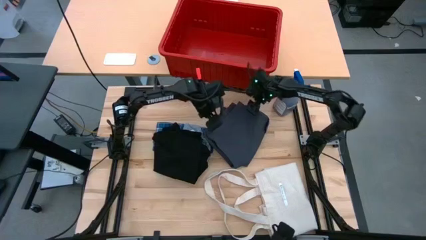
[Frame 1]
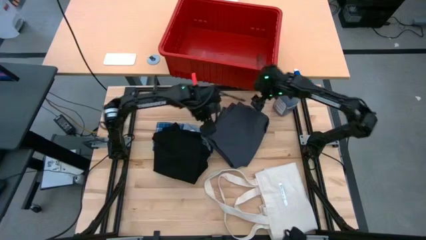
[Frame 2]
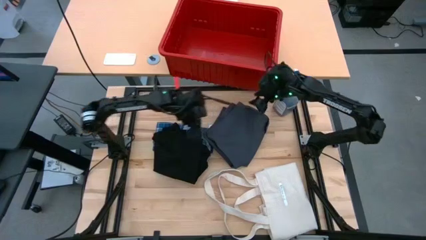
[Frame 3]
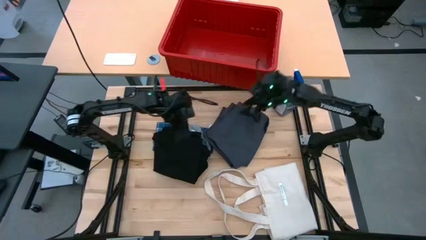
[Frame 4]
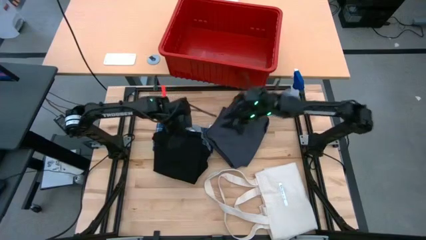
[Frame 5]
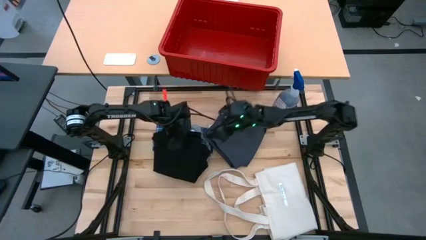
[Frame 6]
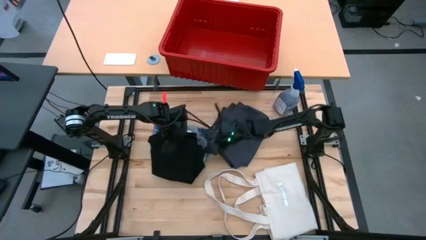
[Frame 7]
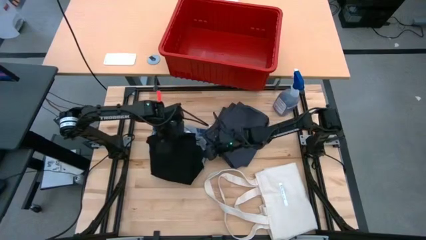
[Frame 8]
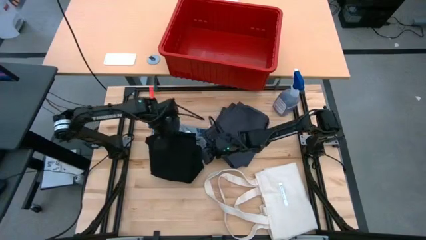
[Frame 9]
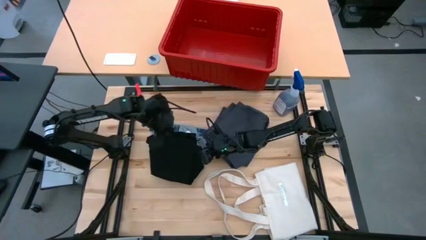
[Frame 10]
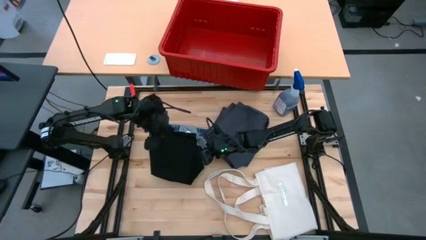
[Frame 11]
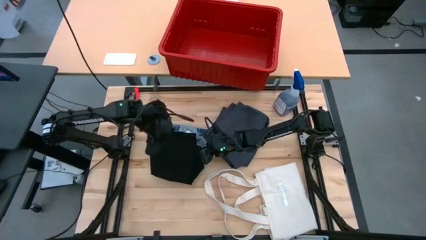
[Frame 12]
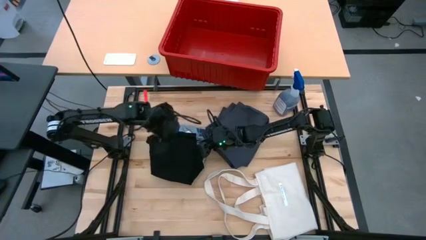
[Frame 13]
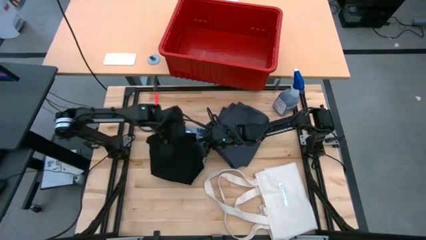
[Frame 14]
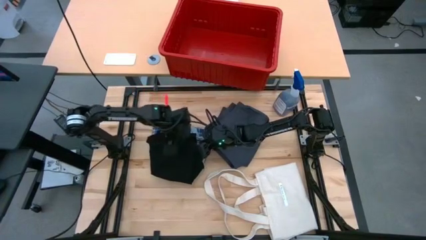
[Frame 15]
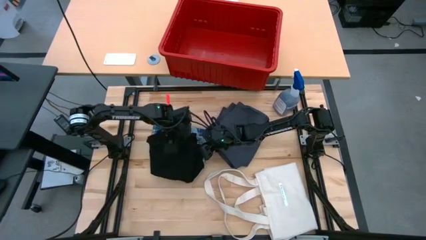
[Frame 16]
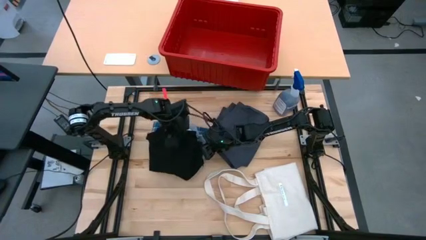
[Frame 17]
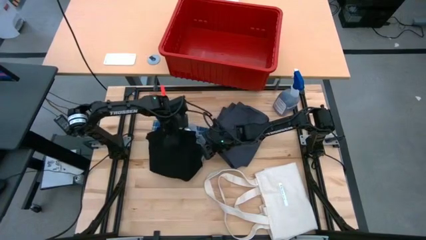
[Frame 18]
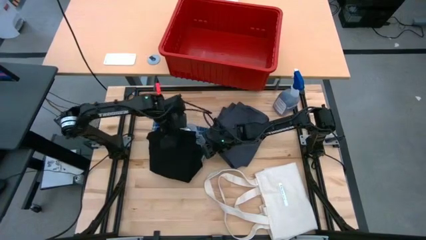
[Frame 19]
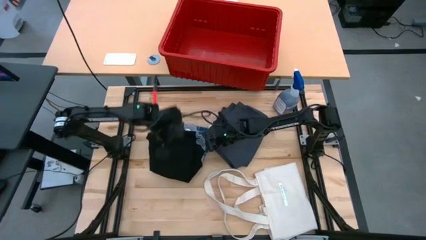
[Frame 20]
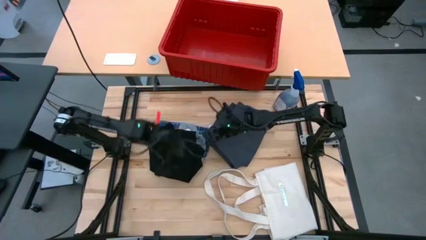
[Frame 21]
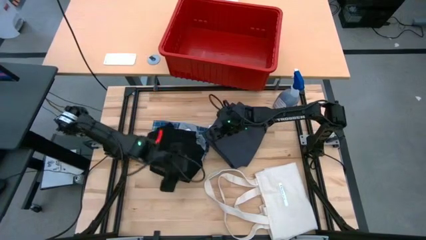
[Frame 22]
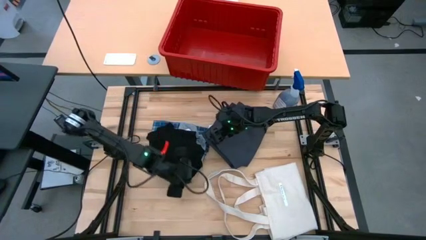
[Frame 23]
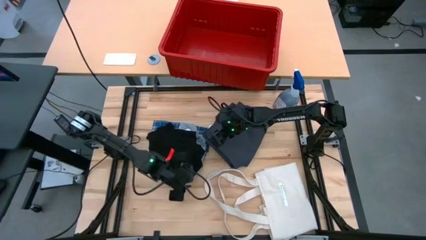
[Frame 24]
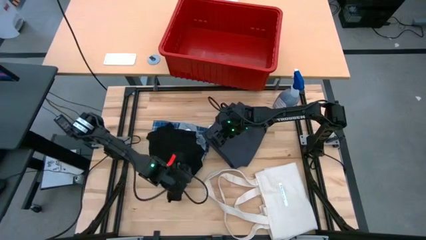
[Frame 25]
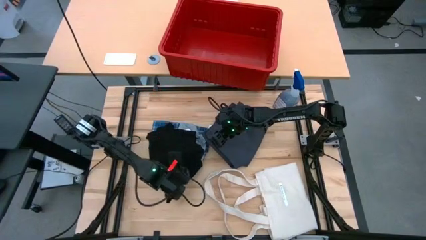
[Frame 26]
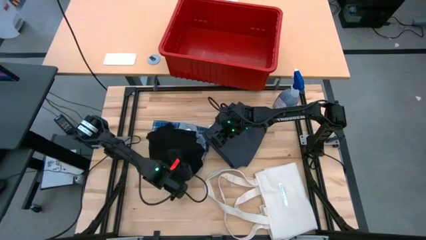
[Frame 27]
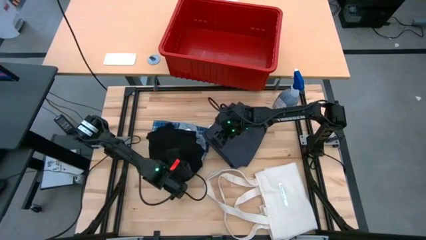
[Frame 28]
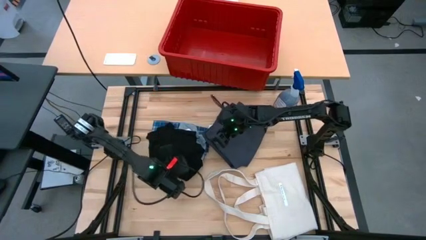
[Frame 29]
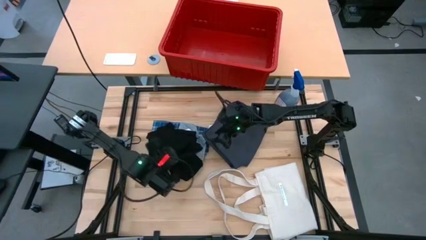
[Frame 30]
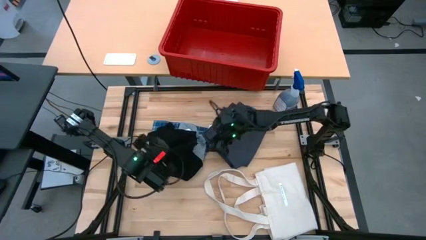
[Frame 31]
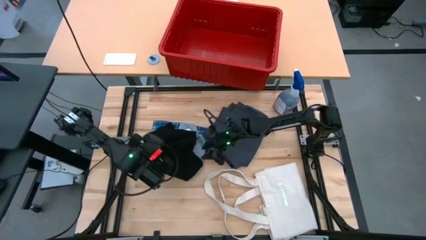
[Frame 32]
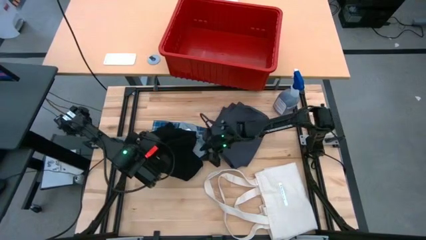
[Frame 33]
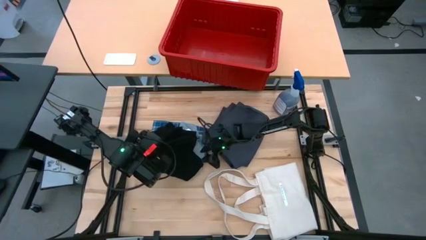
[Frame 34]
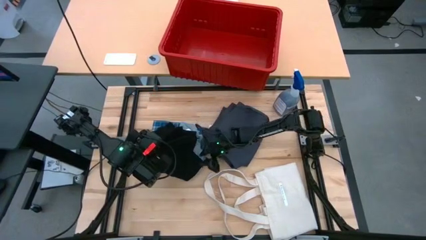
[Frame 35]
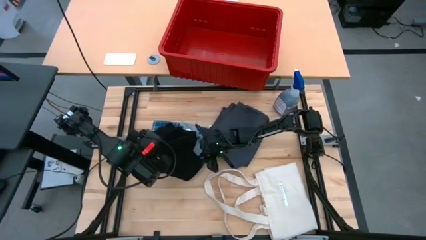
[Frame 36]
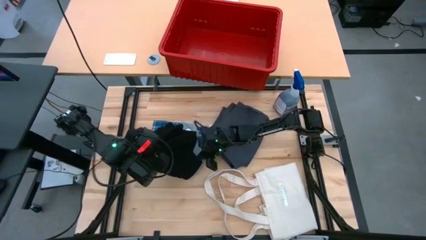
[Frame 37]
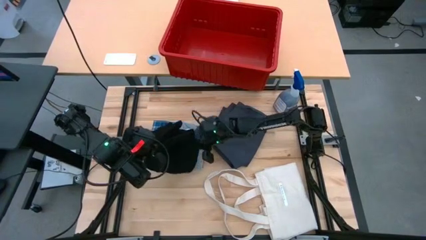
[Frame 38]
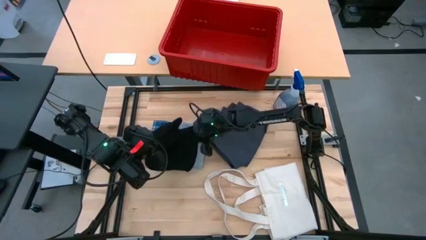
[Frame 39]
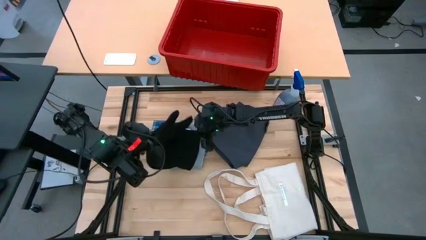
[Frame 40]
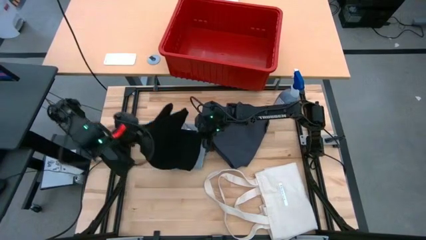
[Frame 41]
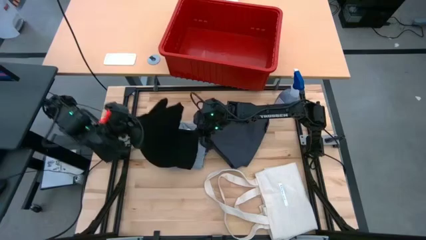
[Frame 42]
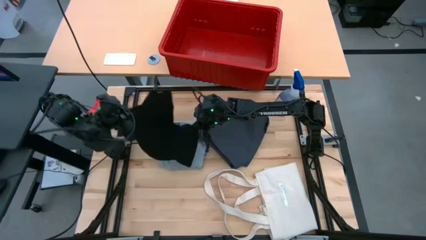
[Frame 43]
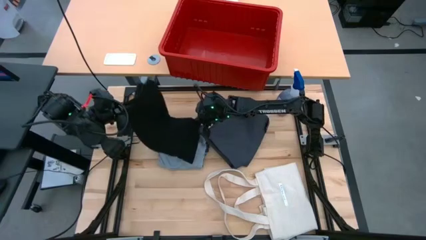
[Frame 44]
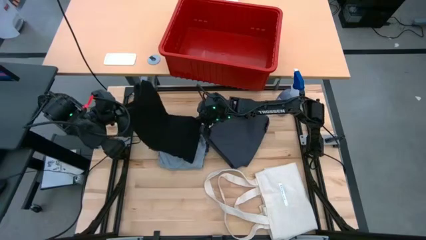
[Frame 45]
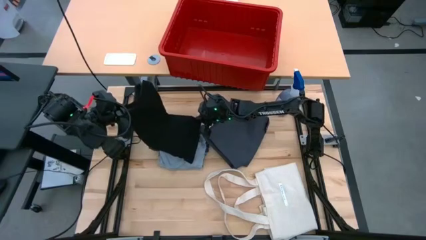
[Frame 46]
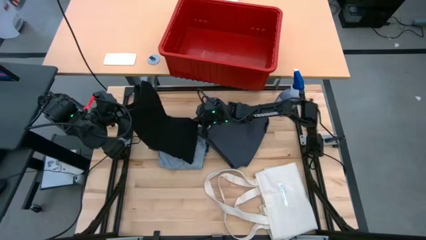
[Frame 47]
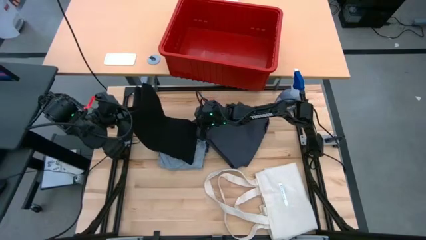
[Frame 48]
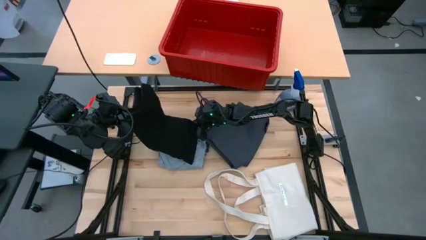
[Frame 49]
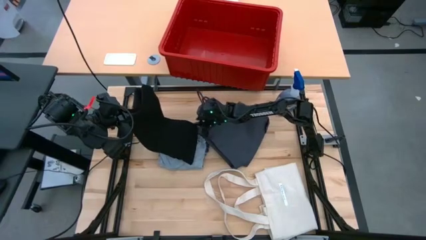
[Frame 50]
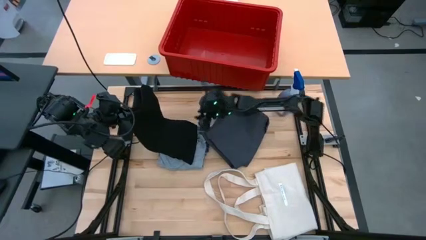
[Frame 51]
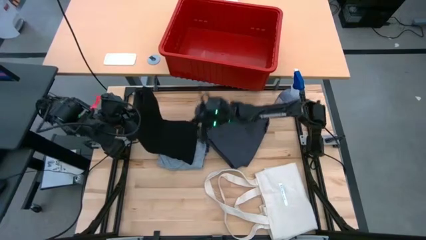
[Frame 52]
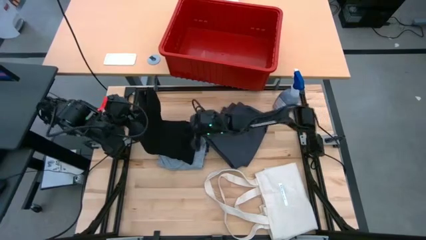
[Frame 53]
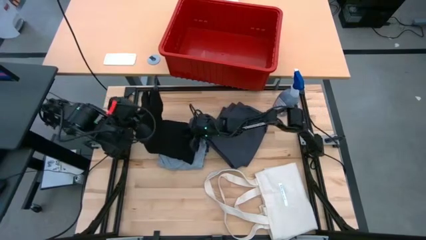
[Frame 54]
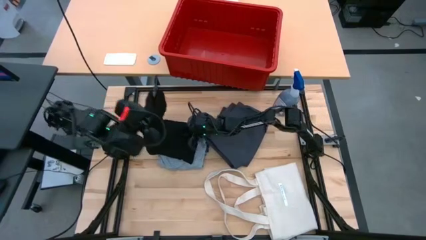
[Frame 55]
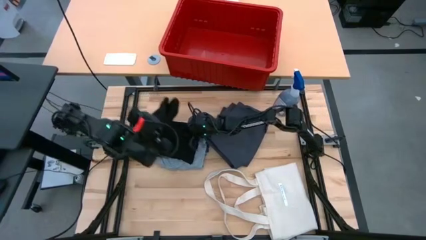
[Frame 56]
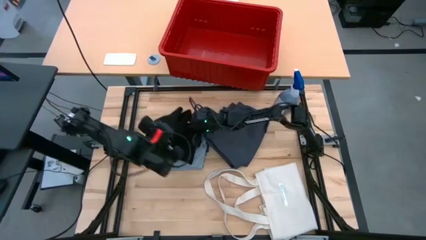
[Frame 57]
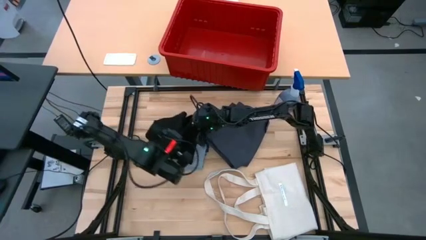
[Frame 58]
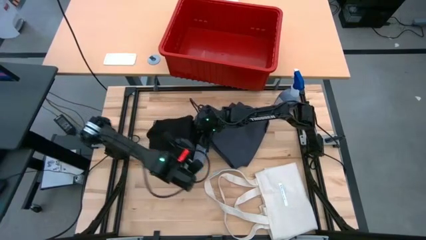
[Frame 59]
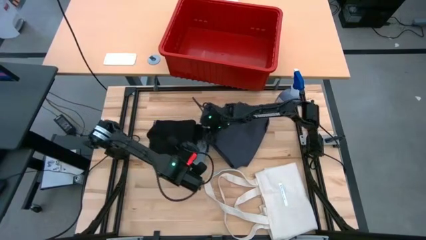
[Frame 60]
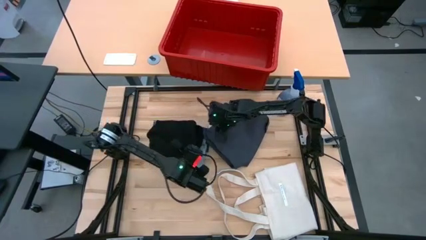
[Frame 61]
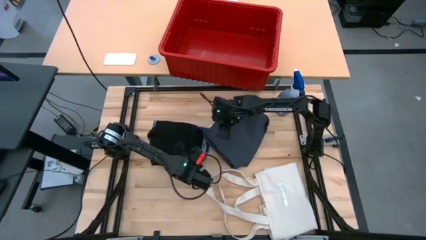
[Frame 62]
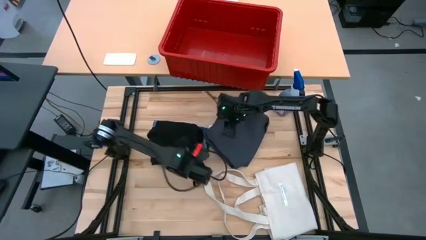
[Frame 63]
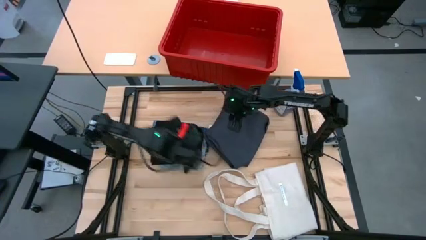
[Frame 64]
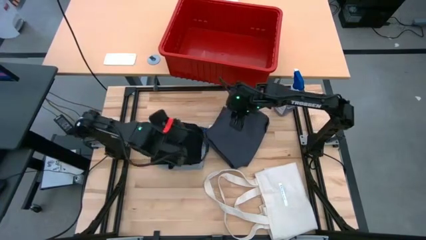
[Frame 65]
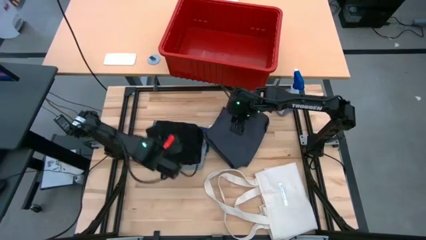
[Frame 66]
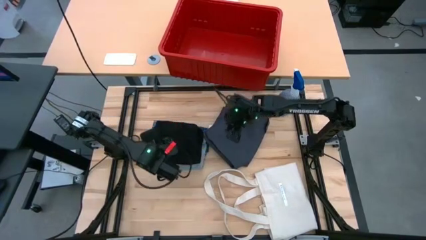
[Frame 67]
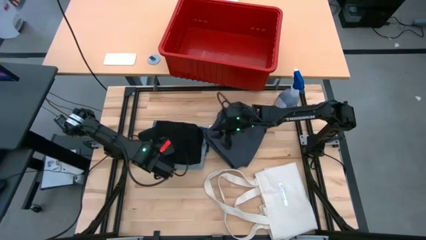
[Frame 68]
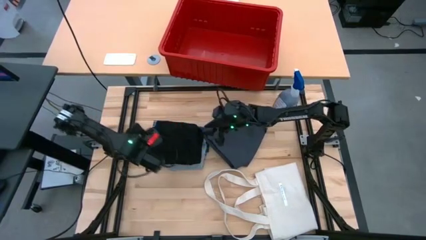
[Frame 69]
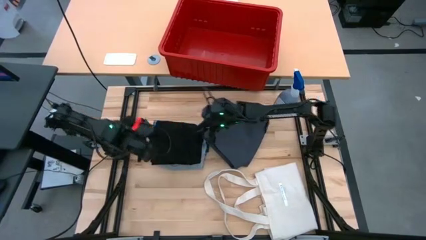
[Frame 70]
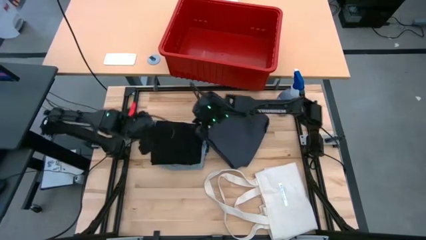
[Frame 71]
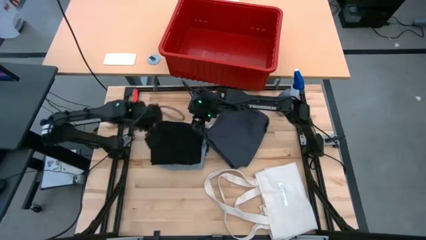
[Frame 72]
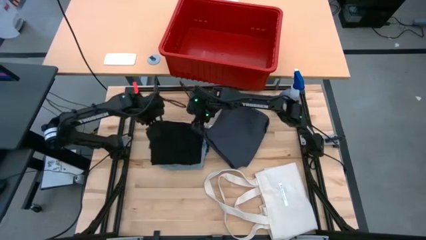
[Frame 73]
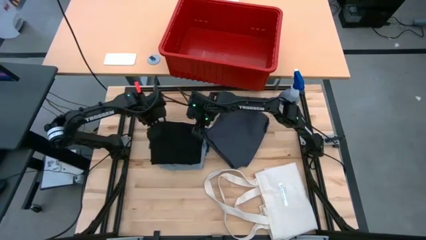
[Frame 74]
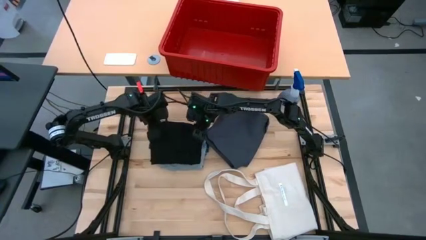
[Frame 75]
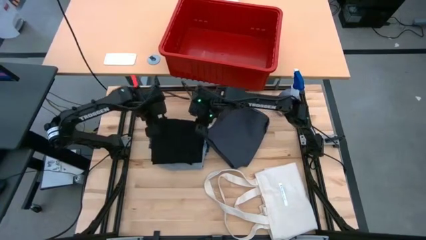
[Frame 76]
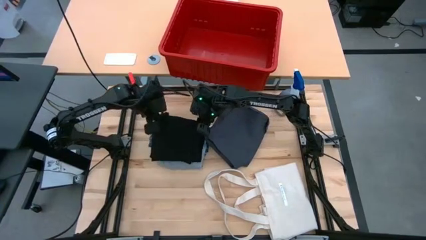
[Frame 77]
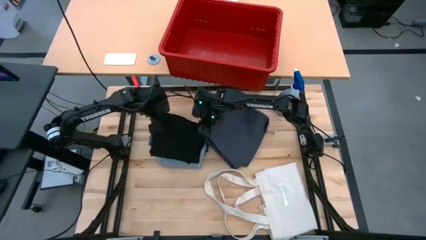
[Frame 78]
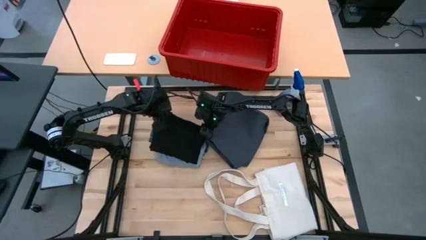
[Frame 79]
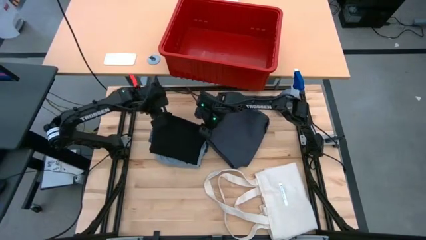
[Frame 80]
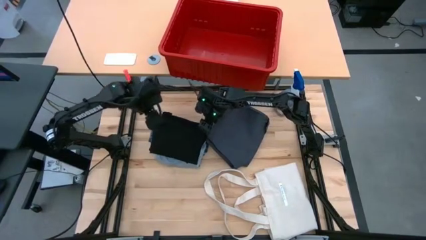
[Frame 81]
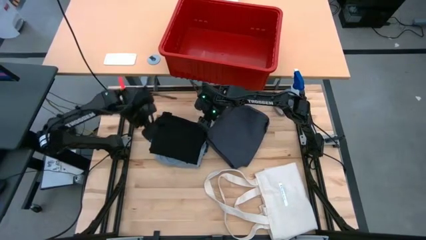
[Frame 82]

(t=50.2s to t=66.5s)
Task: Fold laundry
Fold the black shirt
